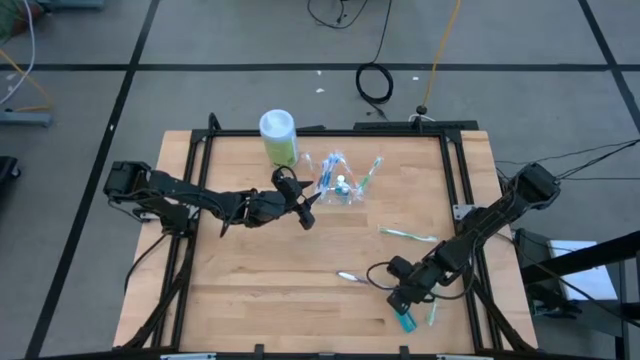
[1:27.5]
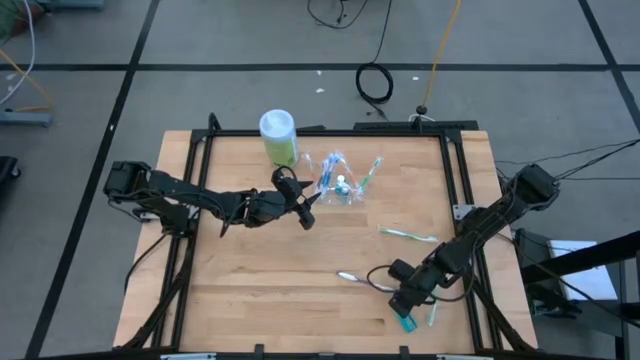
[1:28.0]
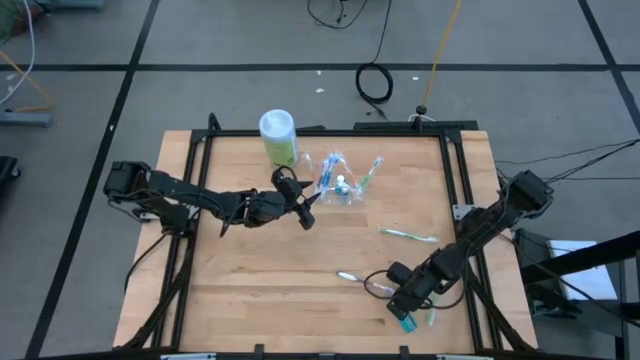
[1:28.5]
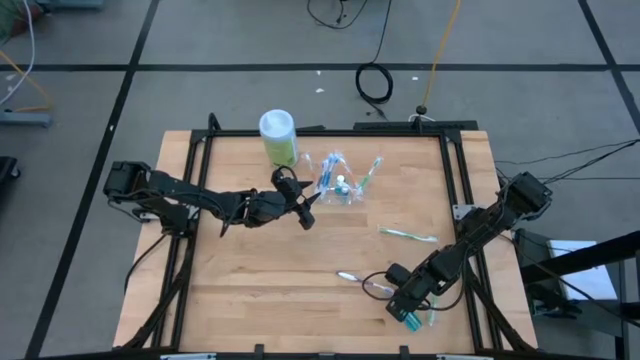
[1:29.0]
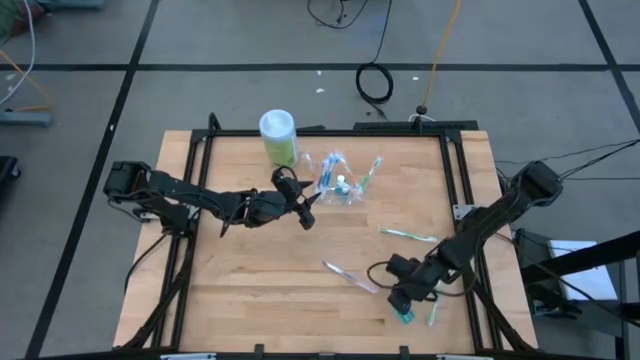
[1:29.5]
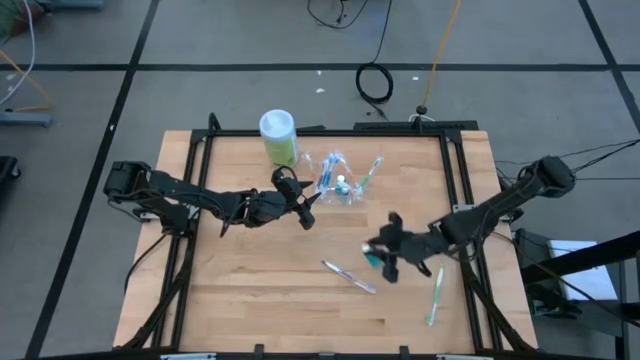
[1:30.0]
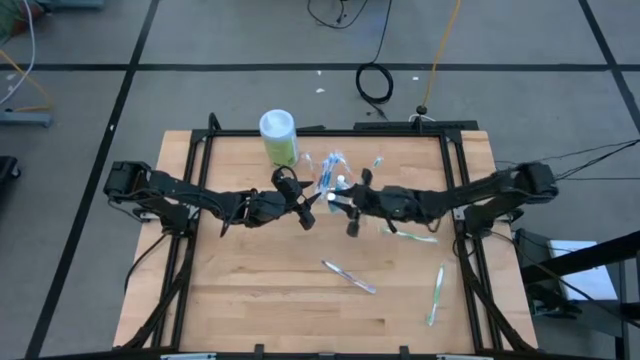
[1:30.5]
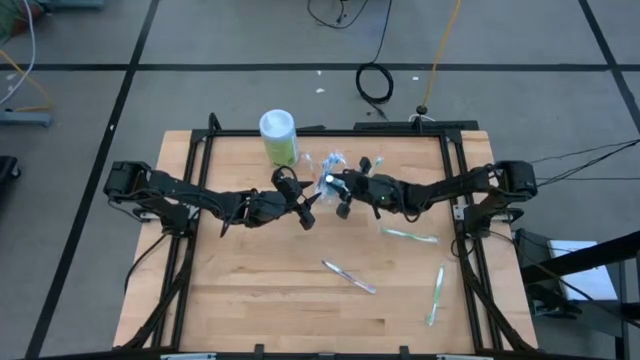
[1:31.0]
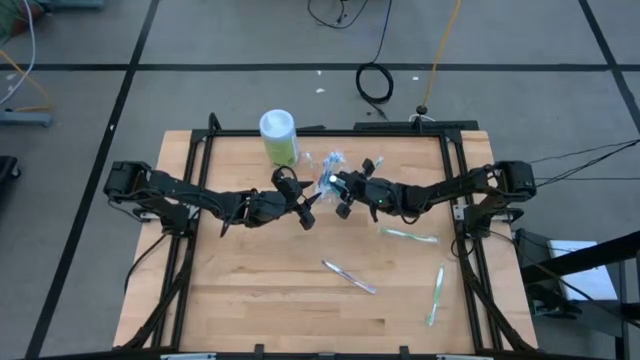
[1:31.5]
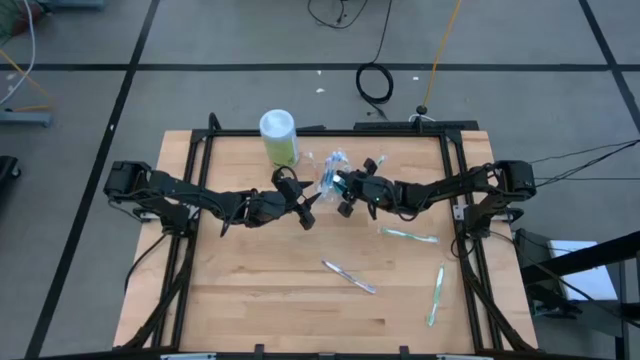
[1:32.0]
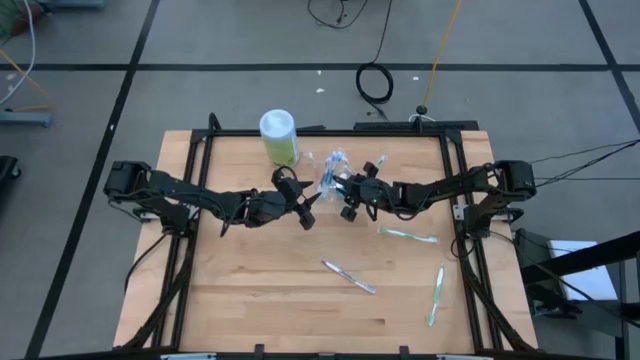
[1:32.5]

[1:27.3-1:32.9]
Task: Pick & Place toothbrushing station
Put the blue mouthwash into the transparent organizer

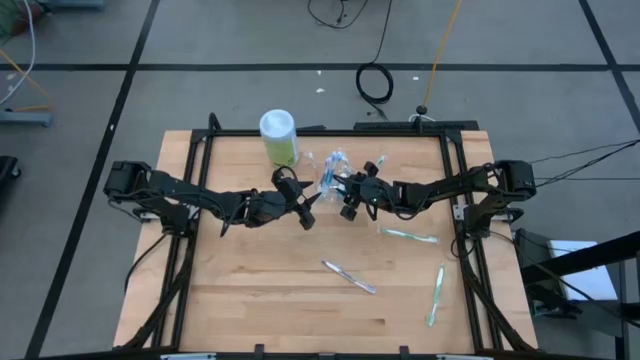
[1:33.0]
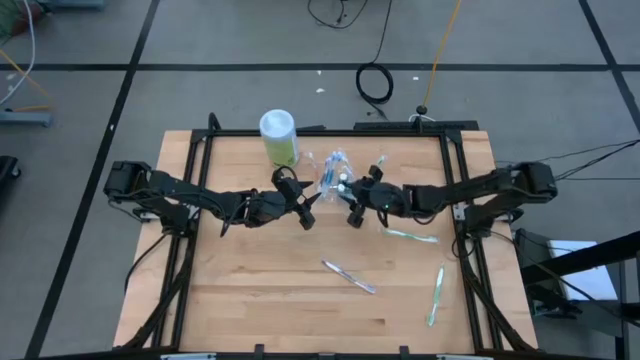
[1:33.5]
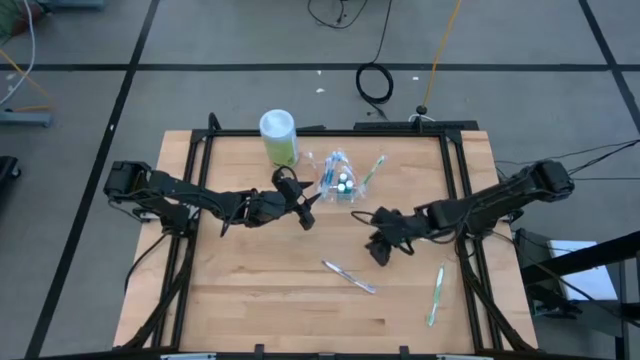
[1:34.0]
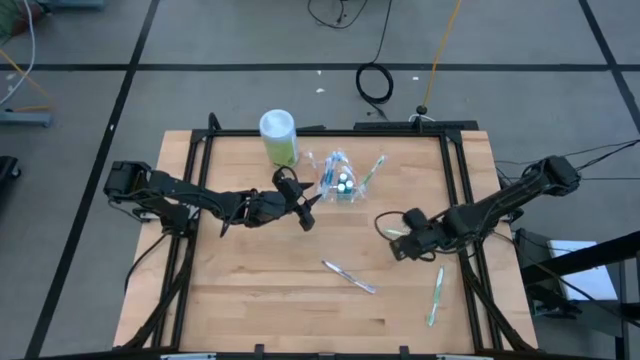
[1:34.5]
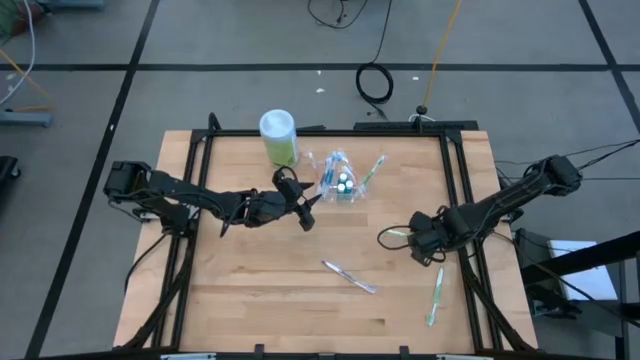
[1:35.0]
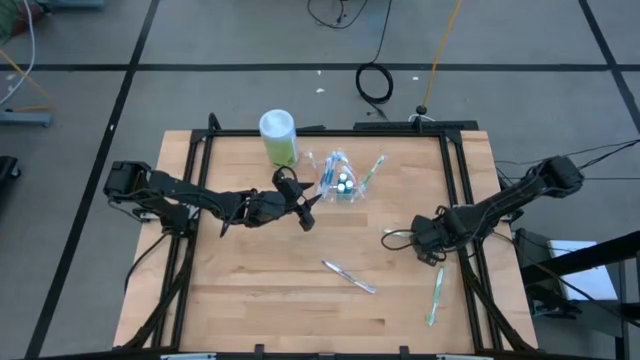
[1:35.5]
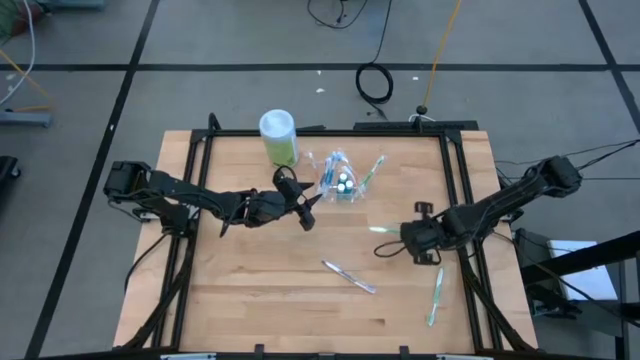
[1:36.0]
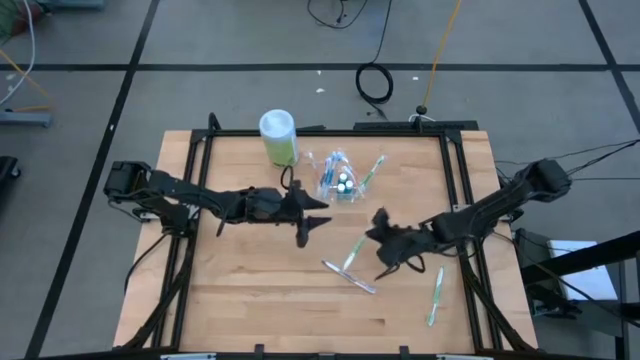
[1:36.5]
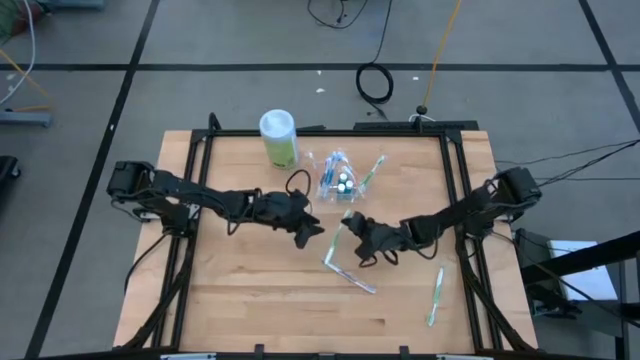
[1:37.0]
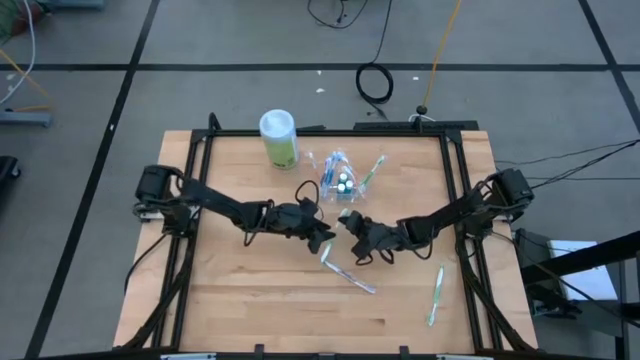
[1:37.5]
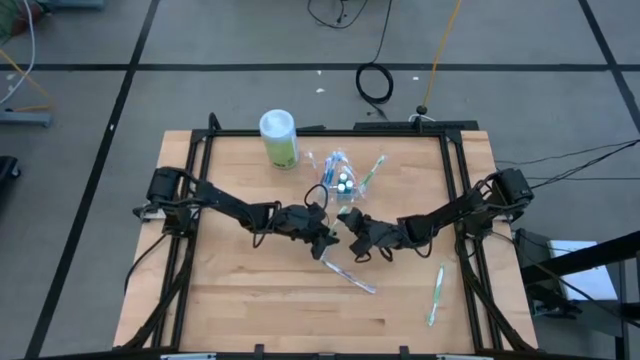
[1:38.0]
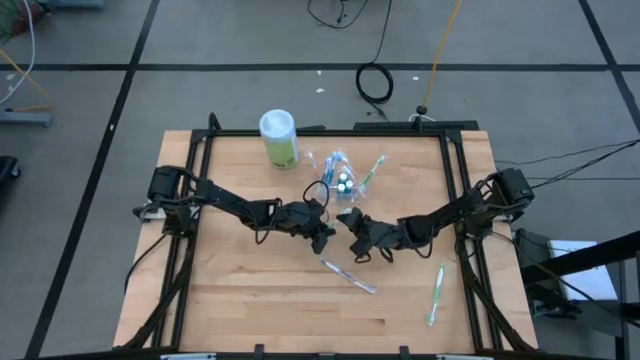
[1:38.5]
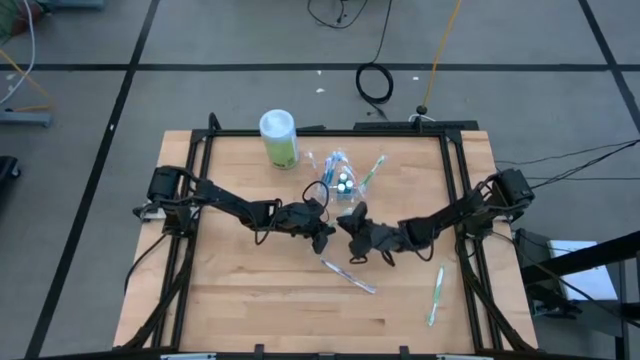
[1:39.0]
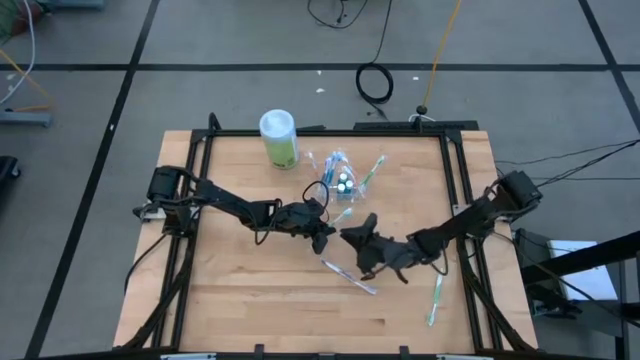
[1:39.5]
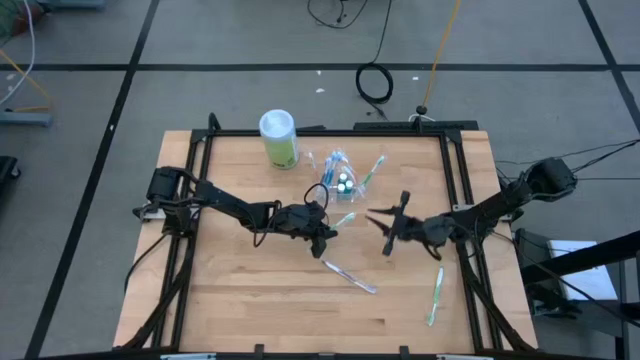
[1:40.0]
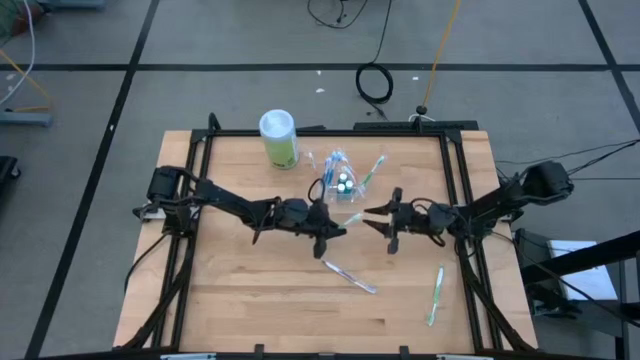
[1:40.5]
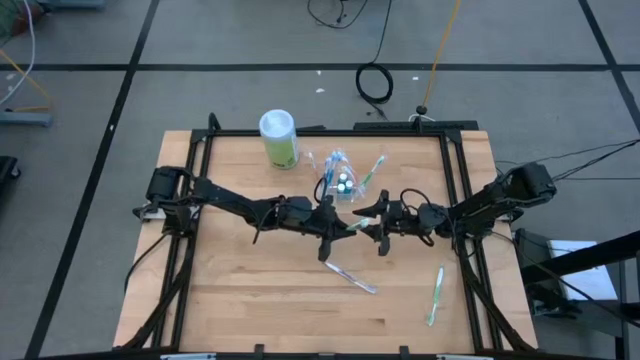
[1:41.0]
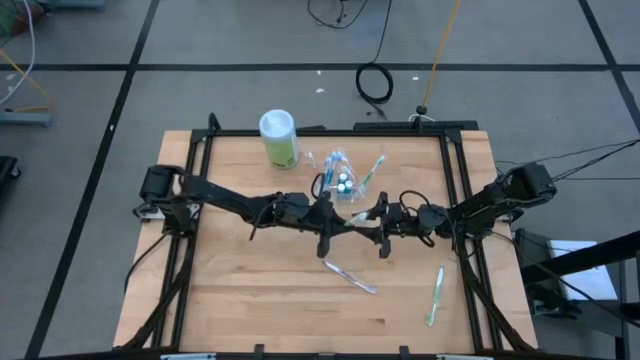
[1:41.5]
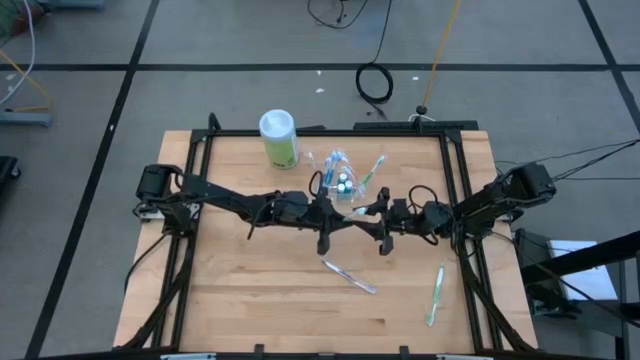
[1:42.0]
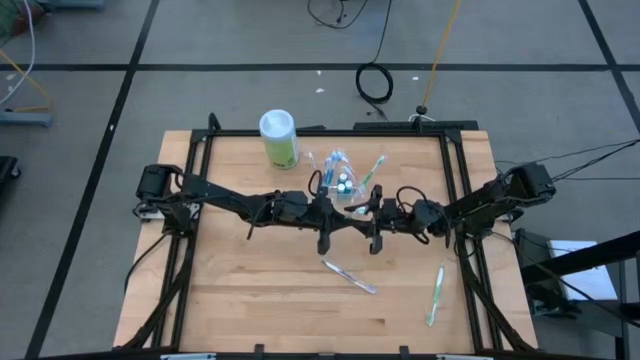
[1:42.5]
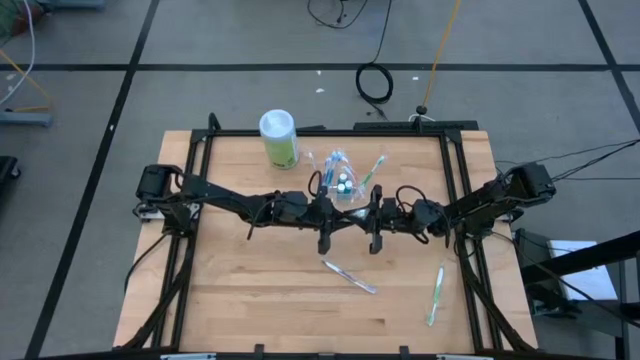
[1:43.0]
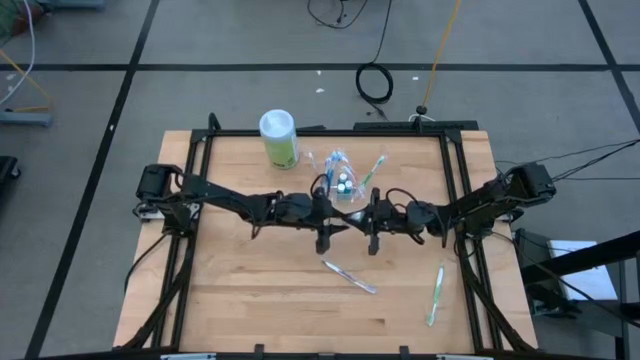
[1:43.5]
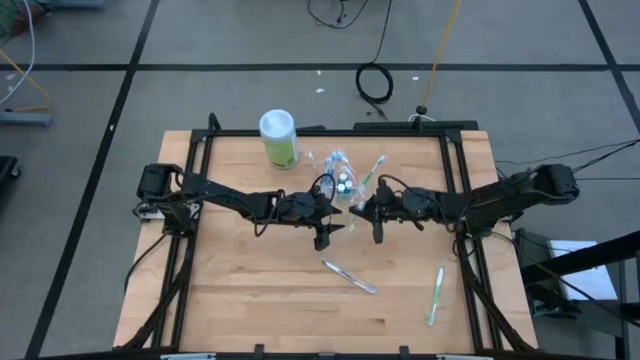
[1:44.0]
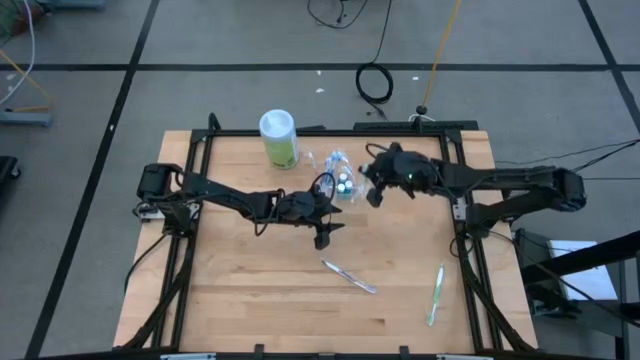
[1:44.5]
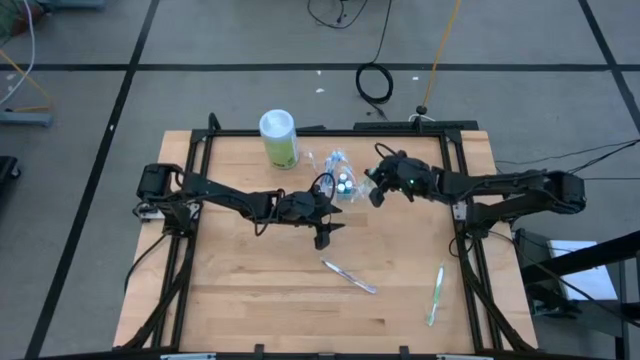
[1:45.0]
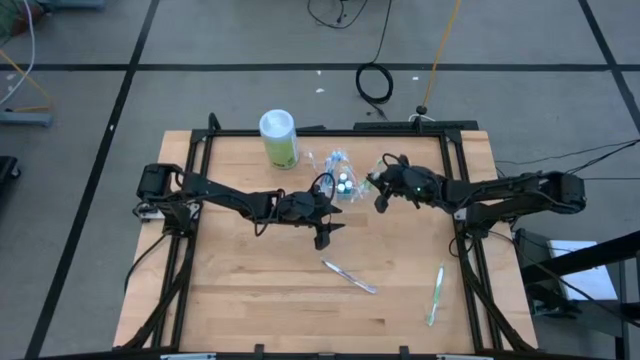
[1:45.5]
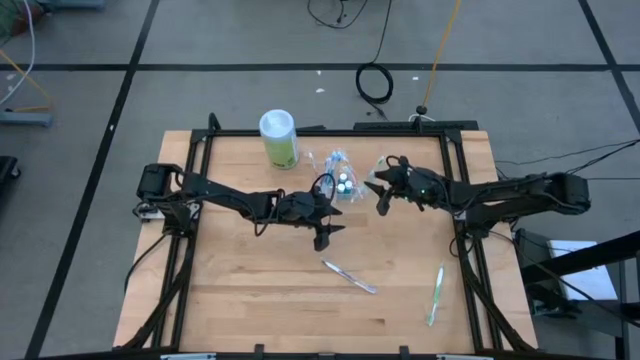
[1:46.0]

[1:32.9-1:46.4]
Put the top green toothbrush into the transparent organizer

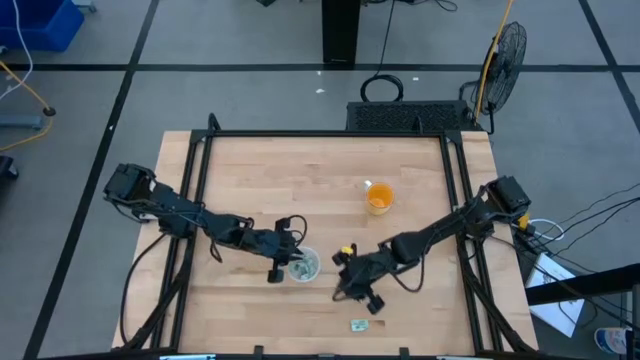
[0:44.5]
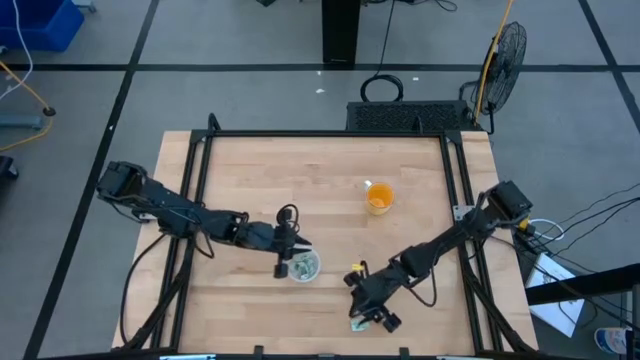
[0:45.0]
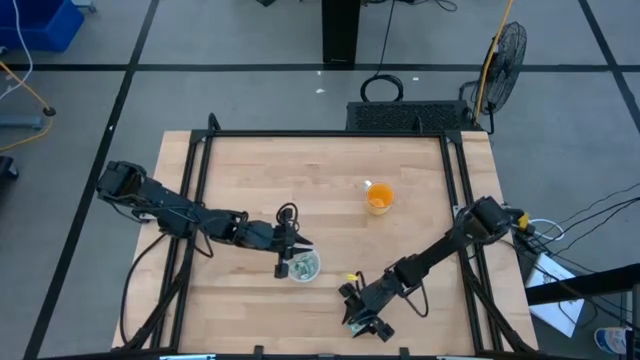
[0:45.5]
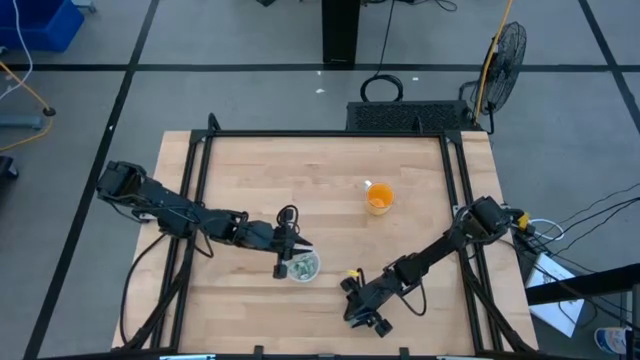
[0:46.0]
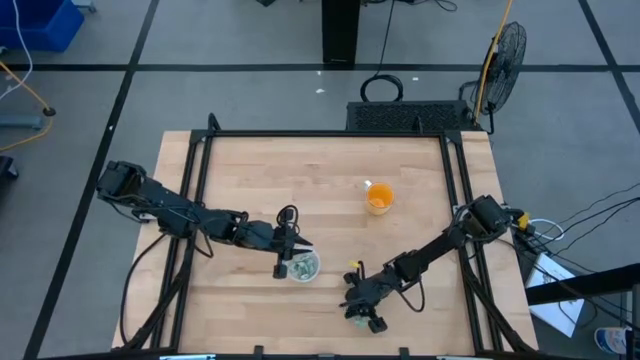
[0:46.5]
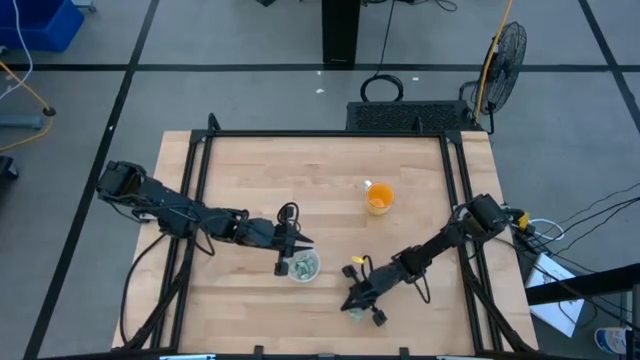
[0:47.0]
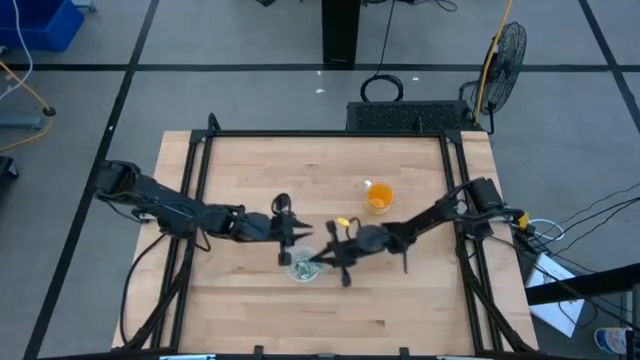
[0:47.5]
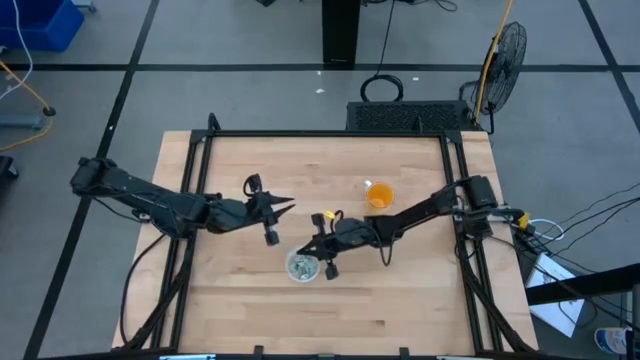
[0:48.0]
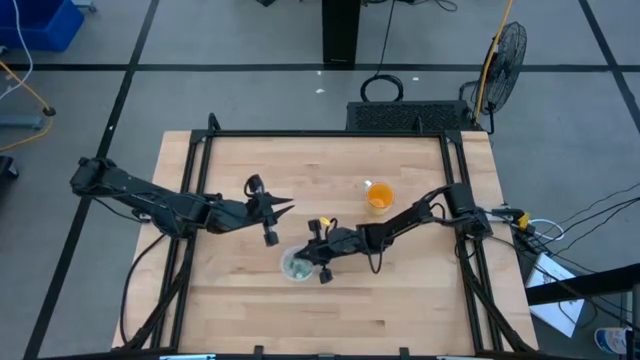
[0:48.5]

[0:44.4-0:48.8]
Task: Pick and place items into bin
Put the white stevia packet into the transparent bin
